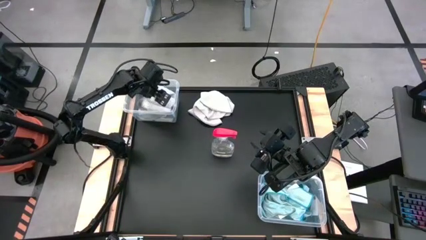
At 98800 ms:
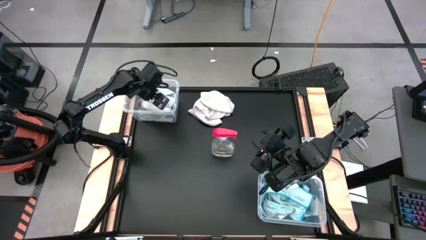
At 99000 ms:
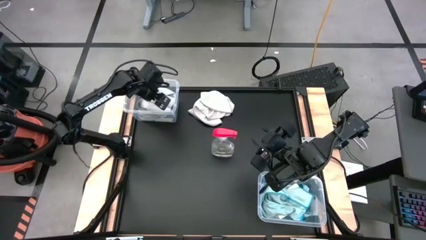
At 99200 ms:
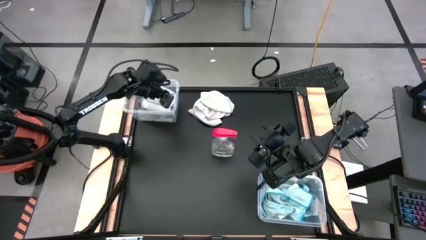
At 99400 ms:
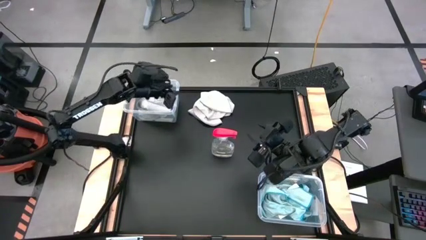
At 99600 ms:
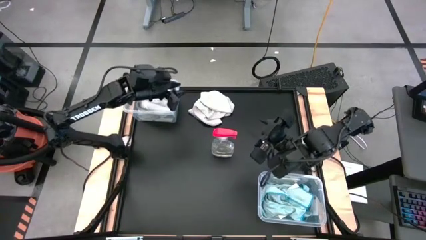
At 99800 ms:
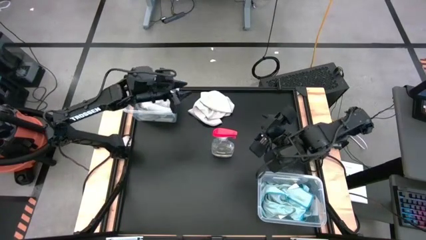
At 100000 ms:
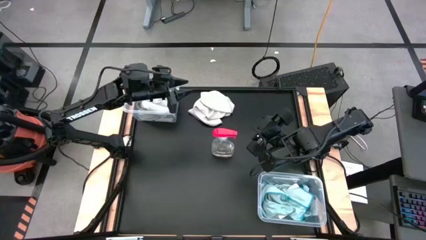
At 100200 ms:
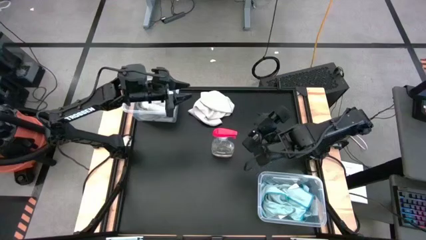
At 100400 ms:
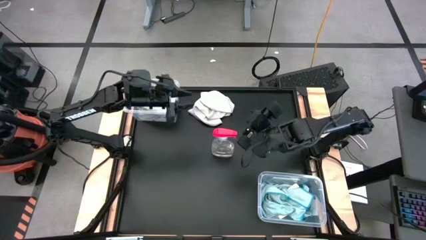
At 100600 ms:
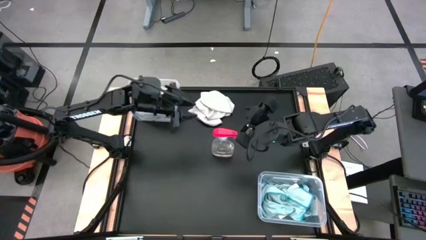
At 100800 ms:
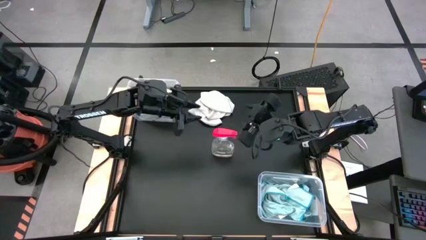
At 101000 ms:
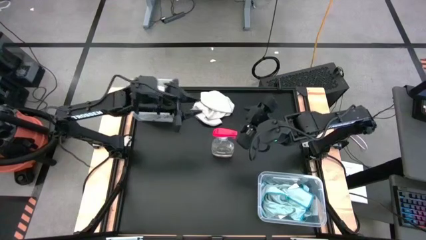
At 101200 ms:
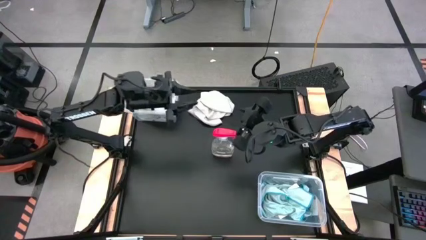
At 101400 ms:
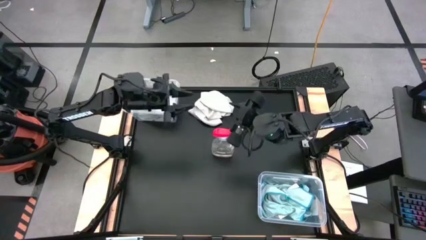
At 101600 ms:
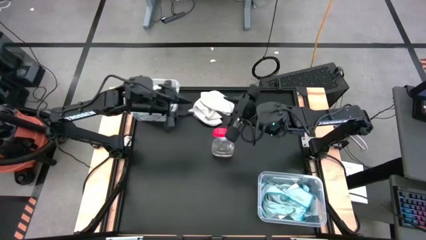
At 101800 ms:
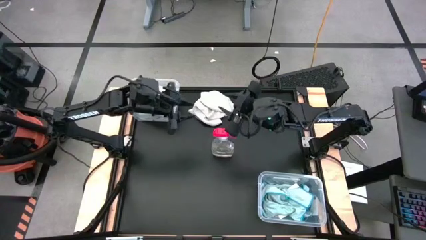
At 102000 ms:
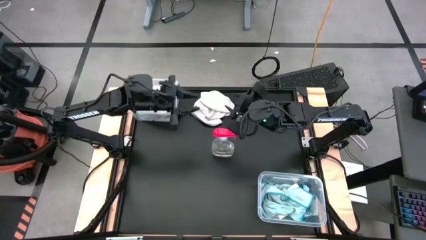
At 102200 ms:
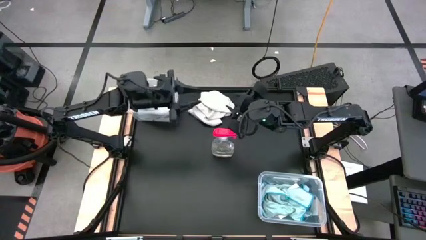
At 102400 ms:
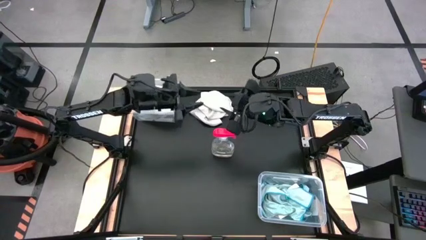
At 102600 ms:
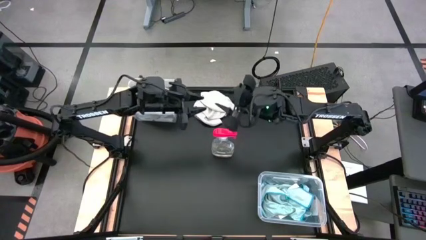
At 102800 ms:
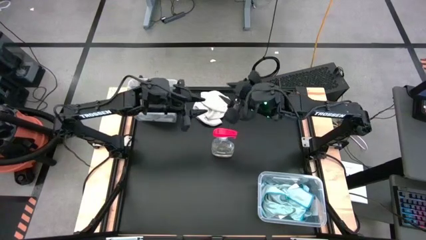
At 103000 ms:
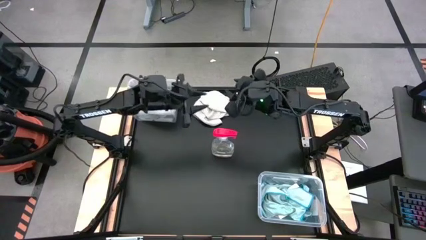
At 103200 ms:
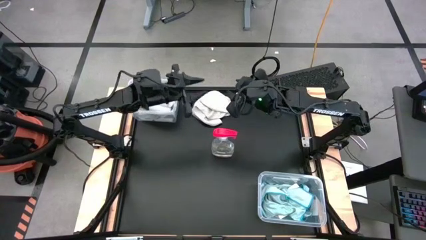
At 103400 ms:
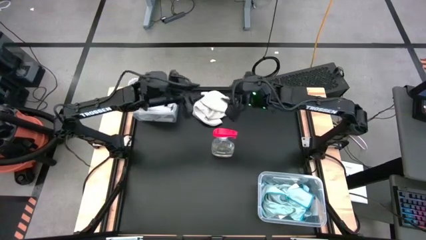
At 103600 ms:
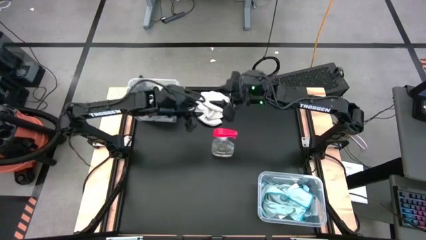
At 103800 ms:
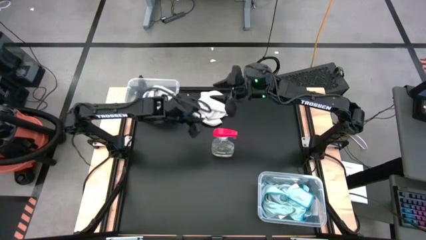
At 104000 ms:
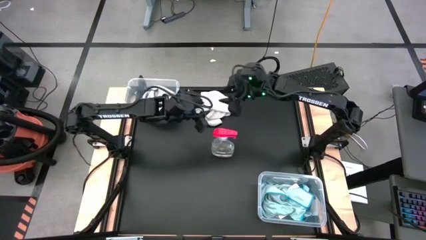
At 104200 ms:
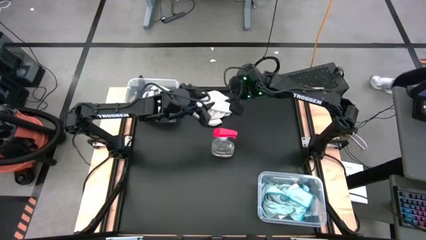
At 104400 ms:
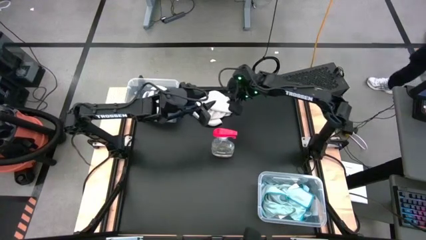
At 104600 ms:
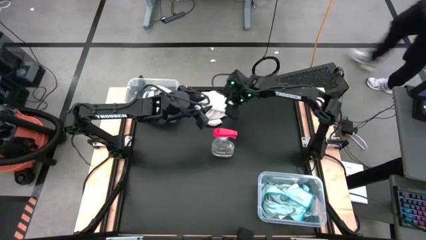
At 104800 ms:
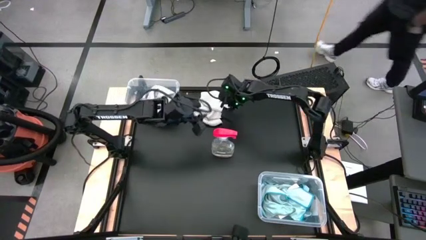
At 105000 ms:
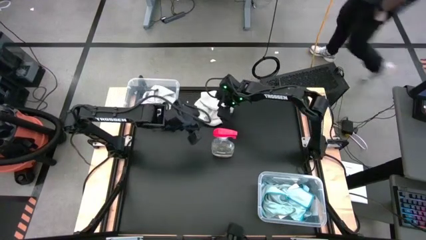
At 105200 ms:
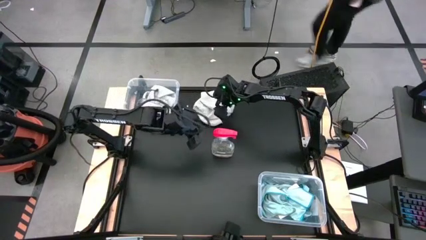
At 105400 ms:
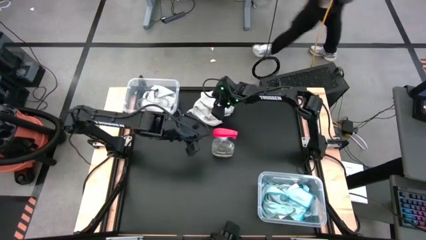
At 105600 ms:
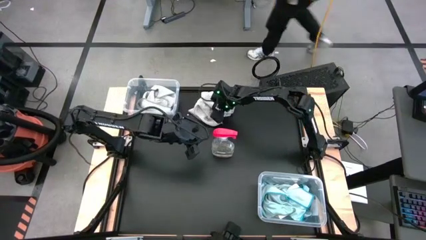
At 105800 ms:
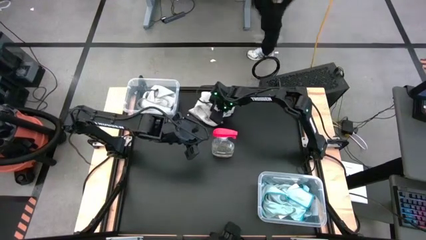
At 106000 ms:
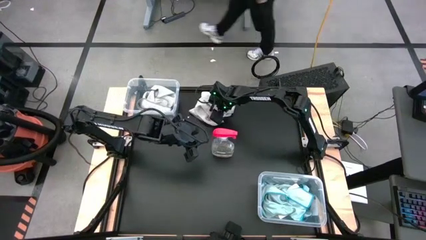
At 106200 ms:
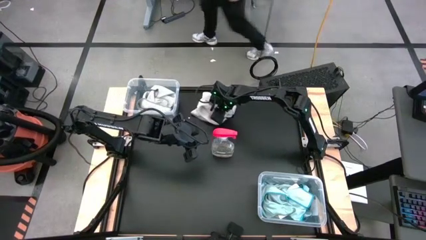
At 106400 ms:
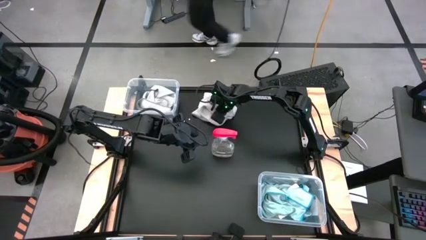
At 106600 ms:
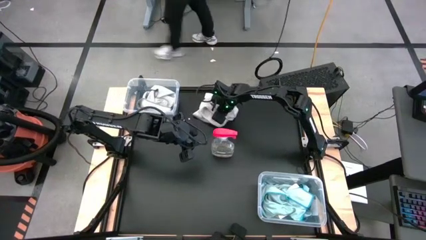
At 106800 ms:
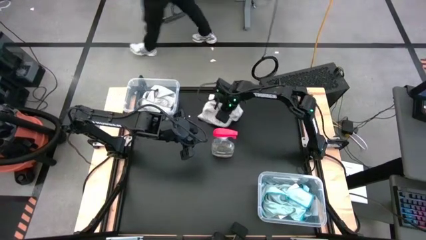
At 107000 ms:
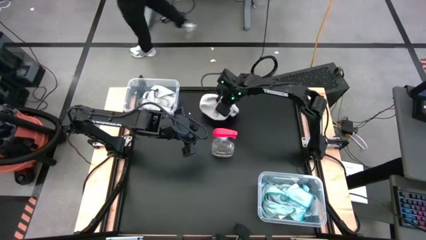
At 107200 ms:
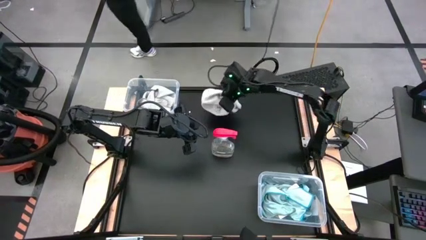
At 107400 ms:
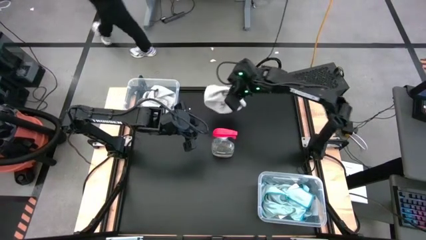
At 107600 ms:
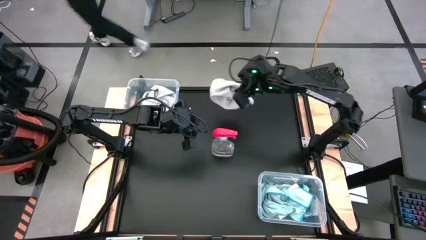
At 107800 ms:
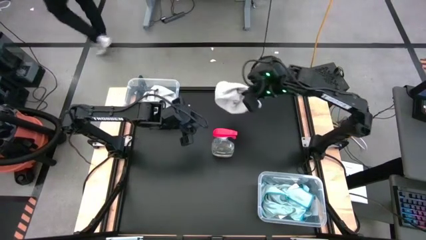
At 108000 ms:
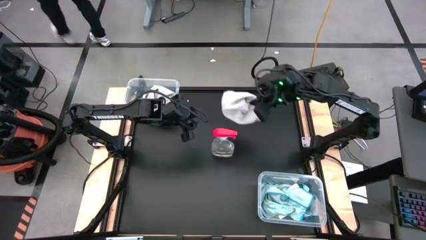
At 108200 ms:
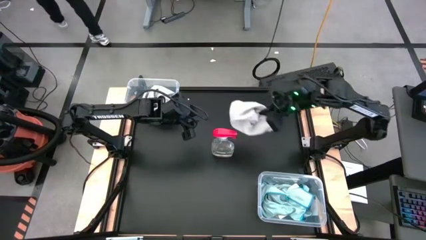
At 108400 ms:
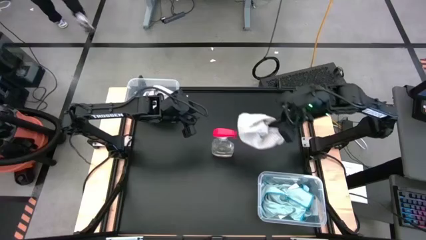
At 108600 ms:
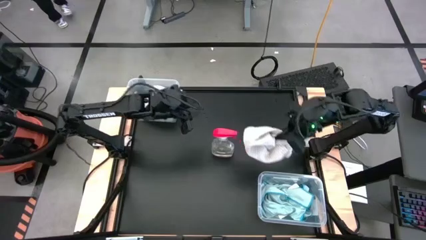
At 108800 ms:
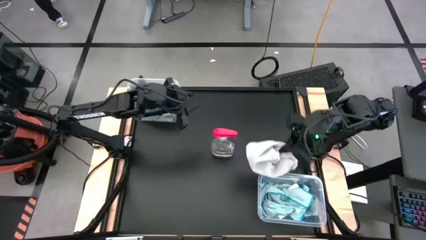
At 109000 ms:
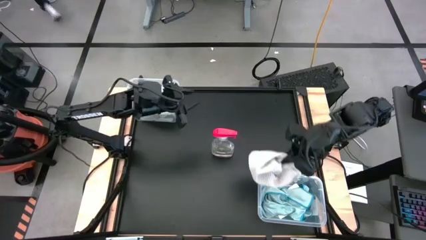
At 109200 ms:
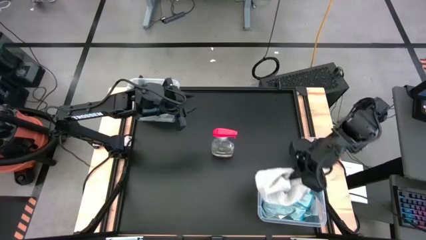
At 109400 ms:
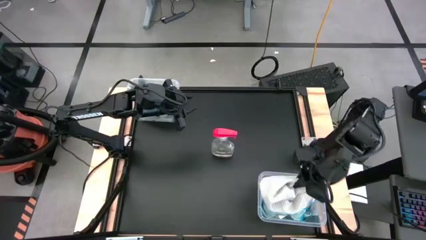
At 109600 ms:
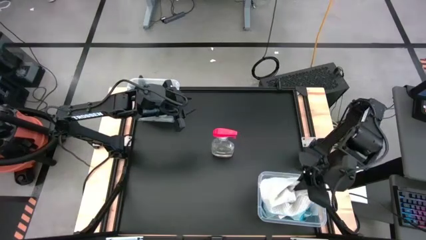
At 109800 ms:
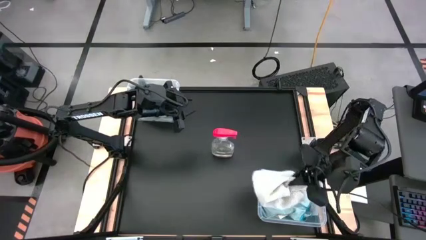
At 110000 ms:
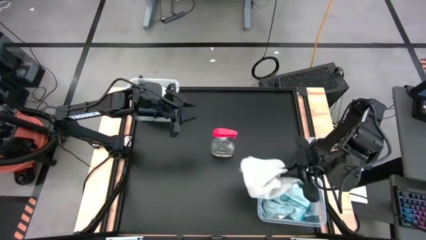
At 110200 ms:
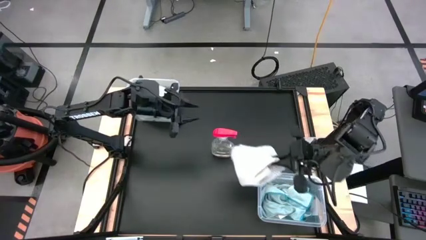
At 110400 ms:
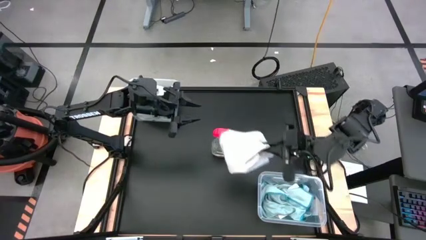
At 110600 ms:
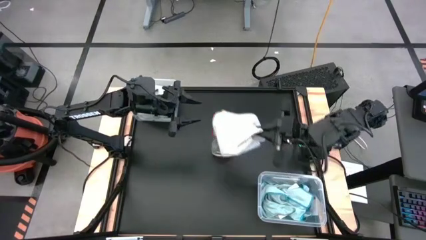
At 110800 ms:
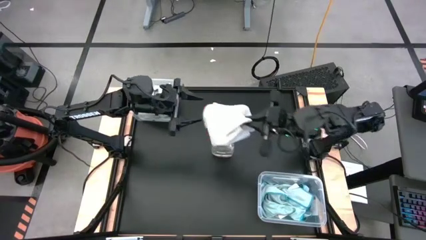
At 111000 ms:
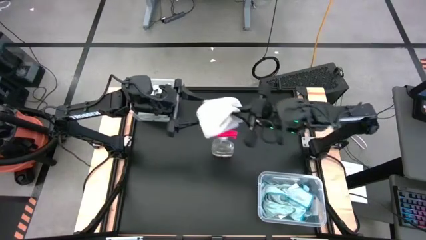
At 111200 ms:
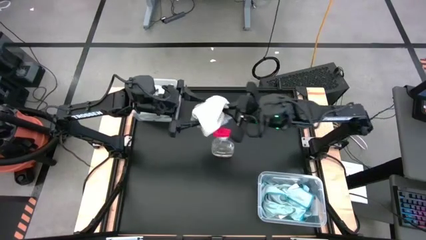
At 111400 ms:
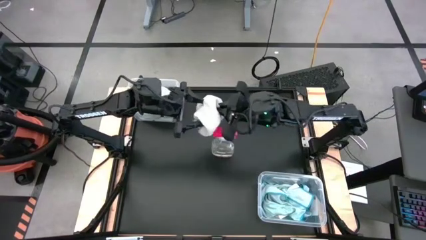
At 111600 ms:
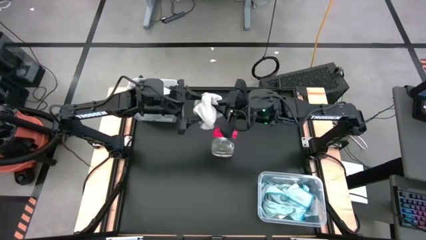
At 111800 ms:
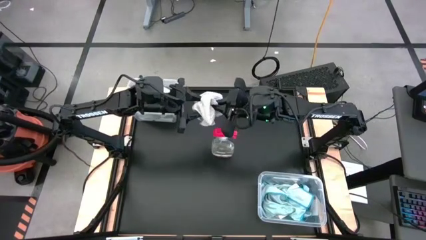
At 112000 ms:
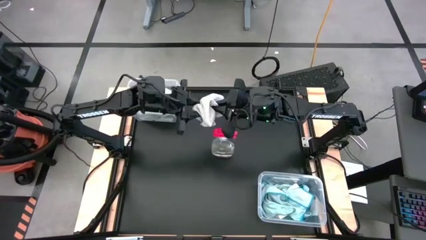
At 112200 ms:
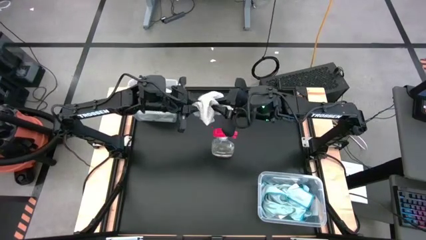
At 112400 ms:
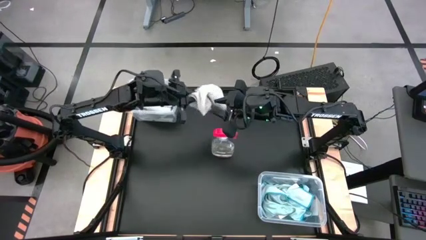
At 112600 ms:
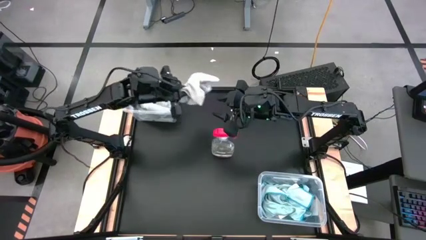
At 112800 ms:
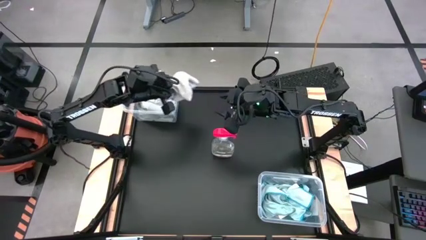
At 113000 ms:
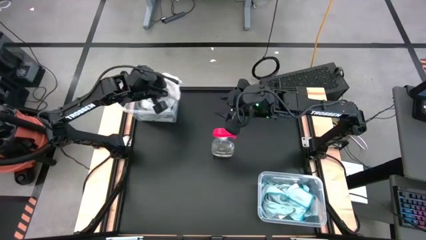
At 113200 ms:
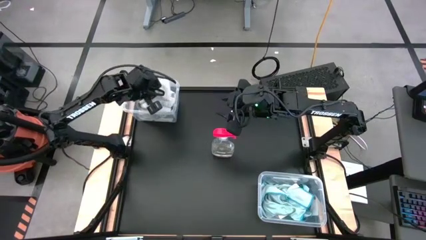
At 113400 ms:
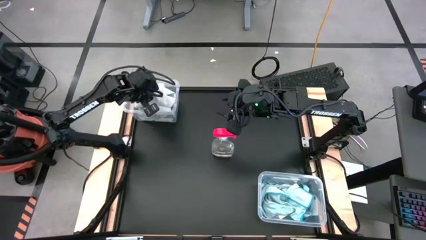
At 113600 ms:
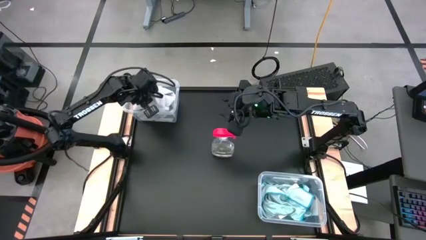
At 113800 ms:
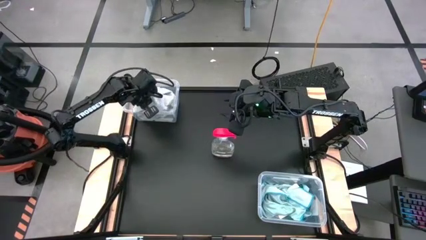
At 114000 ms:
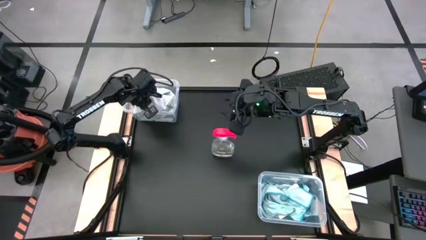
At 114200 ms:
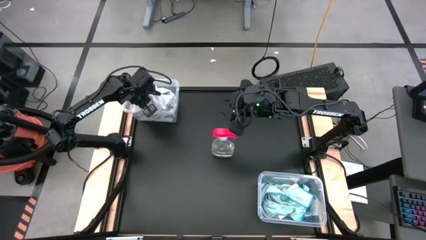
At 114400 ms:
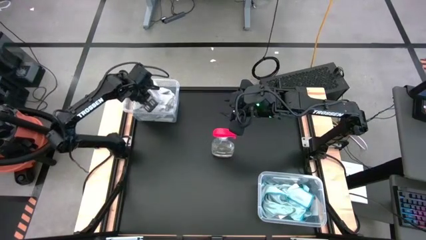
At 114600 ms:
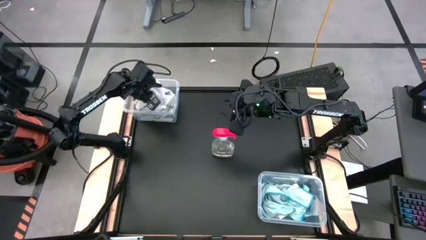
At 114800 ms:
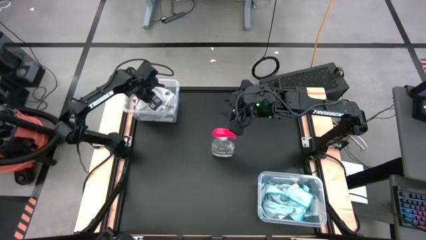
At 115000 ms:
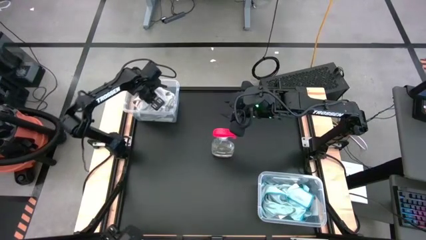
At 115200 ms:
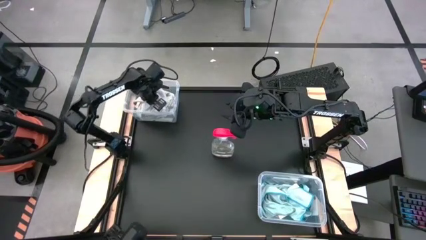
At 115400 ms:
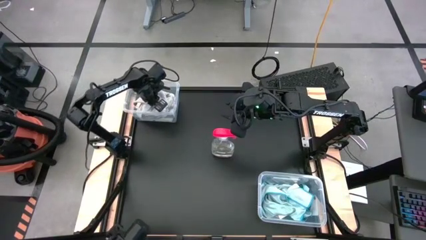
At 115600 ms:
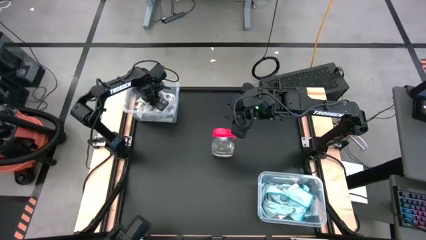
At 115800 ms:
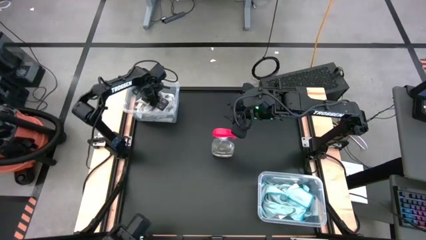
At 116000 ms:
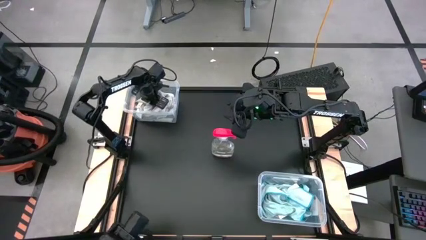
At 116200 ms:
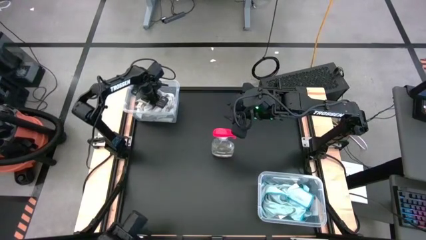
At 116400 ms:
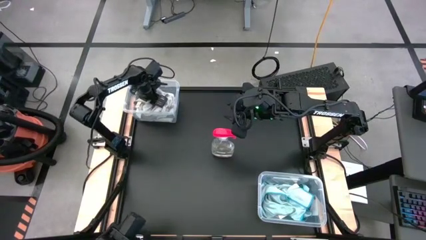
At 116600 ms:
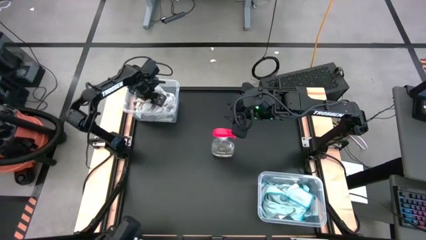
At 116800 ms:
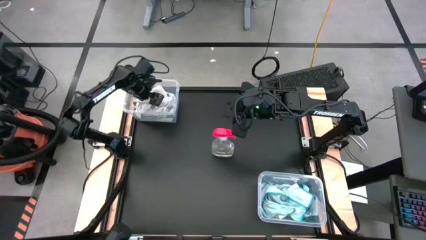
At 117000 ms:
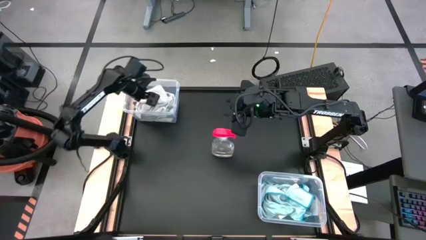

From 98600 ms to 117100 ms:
Task: Sort microfiber towel by color & place in baskets
Put the gray towel into the top transparent bin
